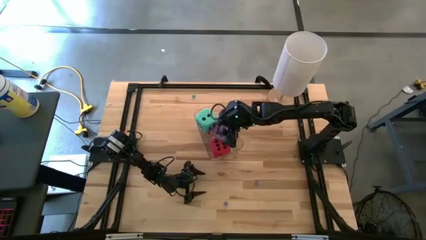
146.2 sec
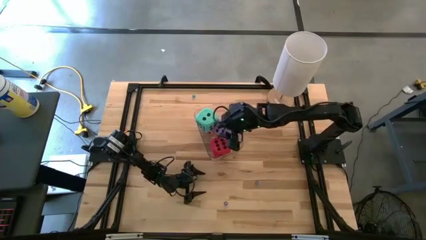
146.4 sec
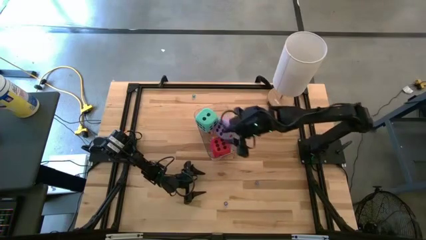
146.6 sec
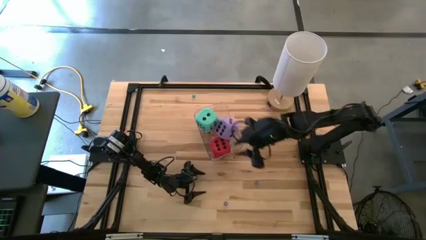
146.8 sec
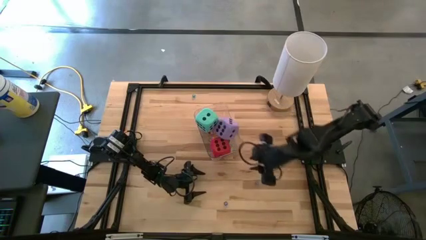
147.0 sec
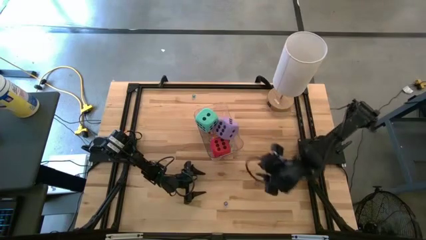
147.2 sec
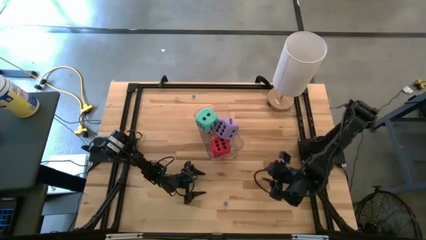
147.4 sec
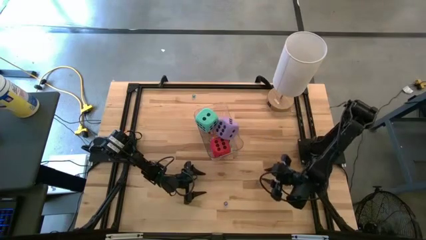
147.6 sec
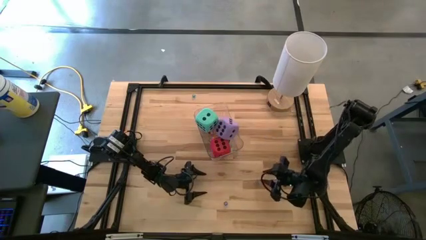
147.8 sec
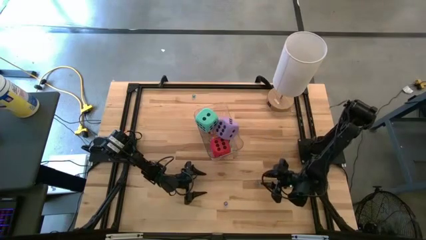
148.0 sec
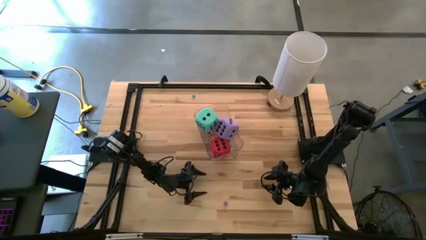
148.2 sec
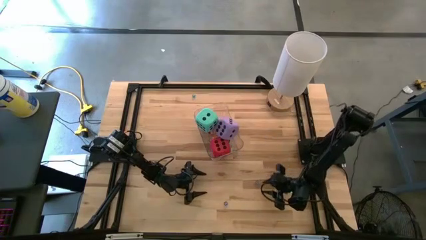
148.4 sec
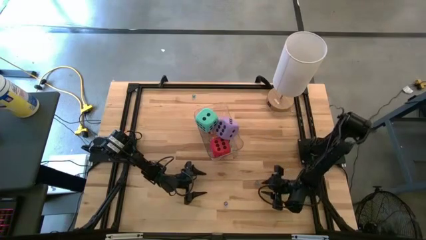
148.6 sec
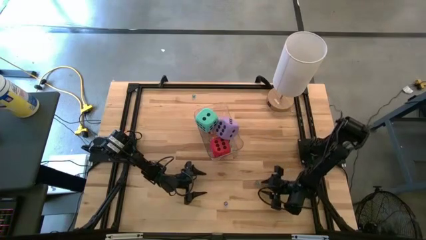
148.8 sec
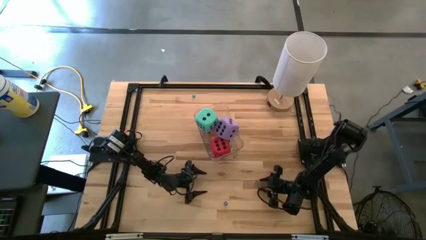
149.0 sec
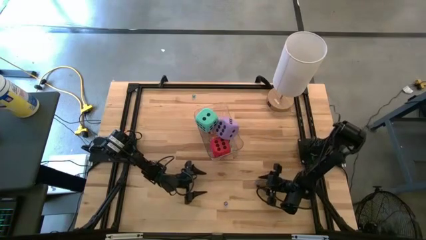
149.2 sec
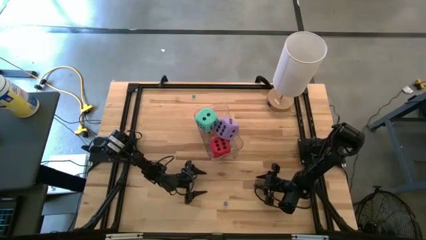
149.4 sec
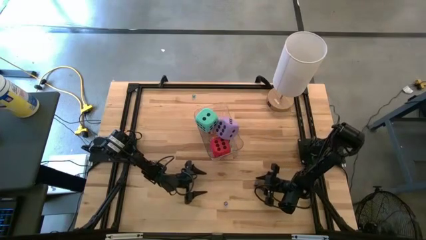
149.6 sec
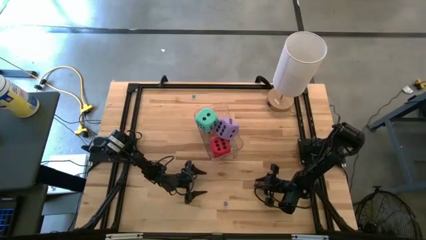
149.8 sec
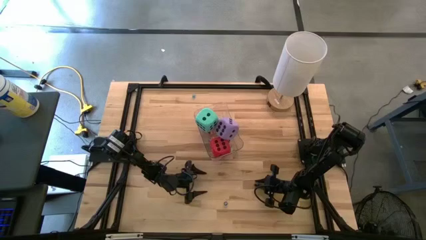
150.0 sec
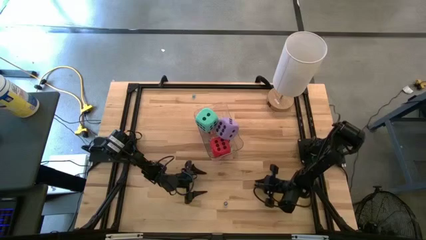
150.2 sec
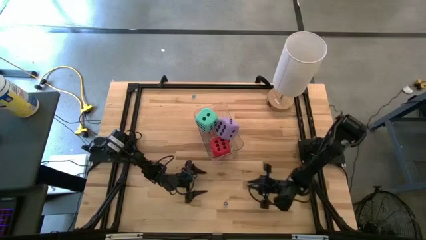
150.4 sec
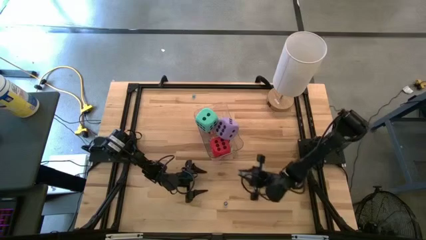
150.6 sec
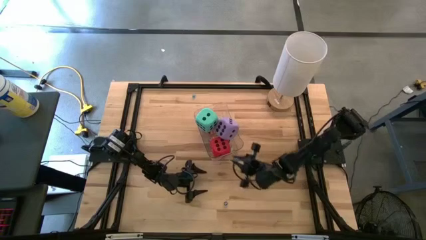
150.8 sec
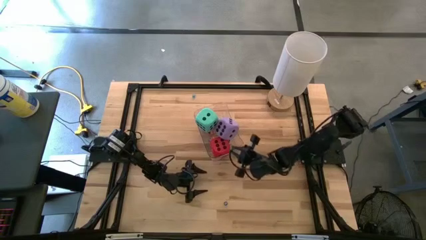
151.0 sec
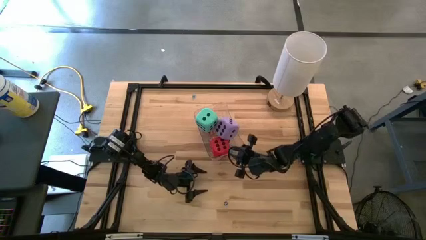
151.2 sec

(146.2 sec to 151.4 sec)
Task: Pick & Place Dice
Put the small blue dice into the transparent bin

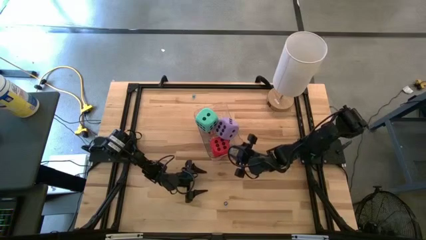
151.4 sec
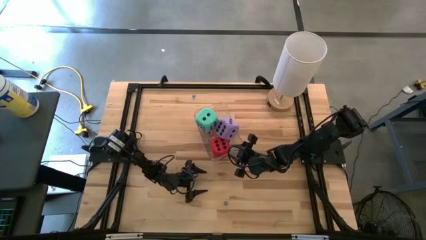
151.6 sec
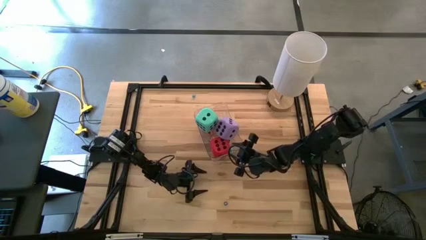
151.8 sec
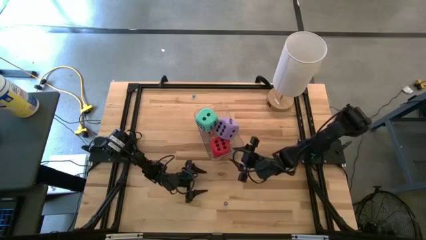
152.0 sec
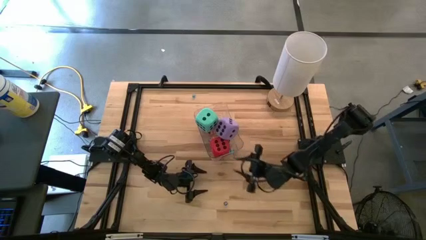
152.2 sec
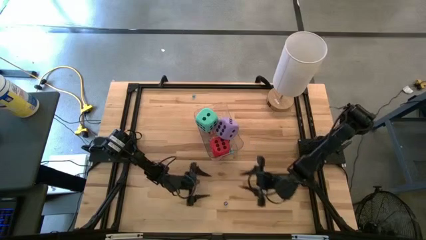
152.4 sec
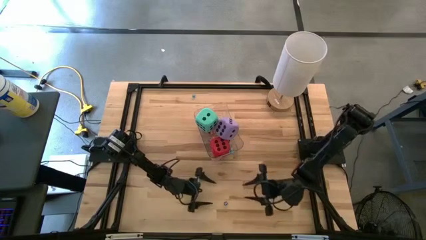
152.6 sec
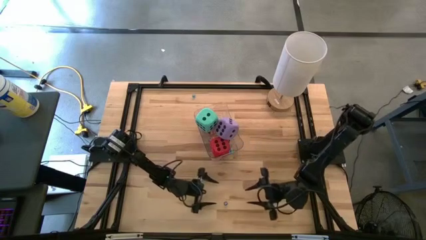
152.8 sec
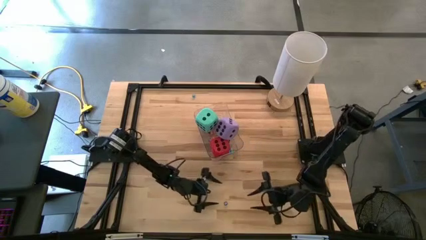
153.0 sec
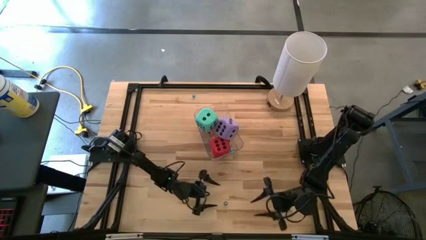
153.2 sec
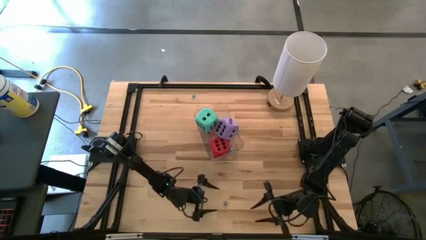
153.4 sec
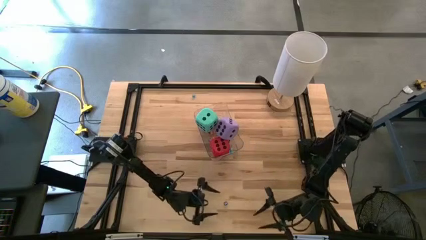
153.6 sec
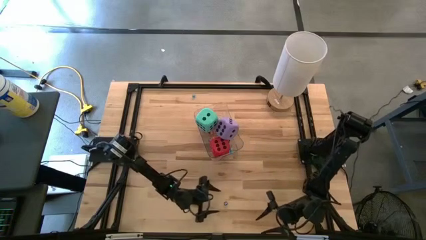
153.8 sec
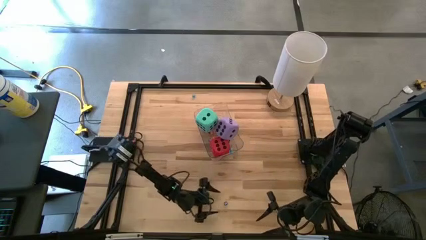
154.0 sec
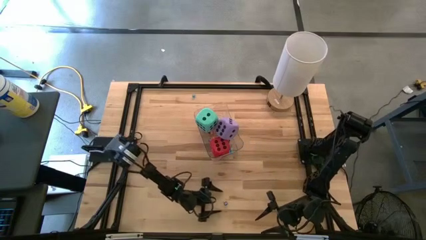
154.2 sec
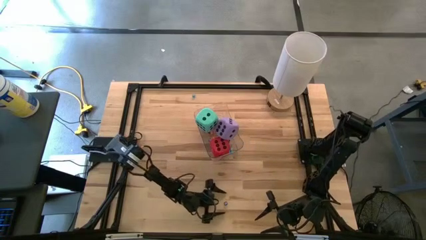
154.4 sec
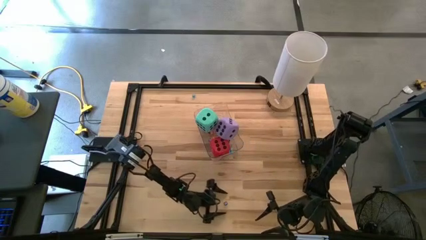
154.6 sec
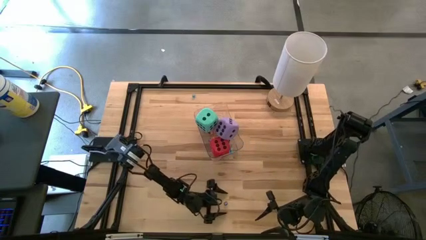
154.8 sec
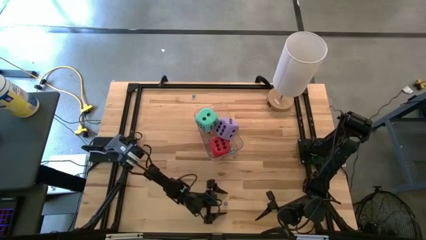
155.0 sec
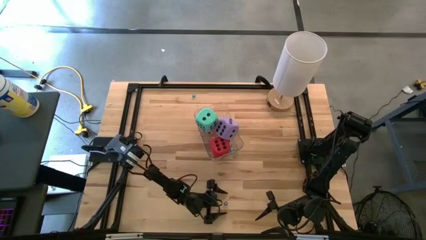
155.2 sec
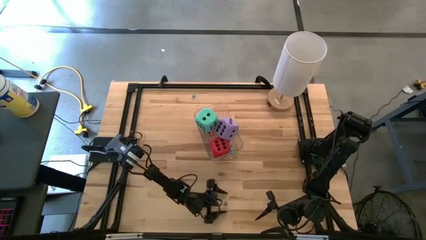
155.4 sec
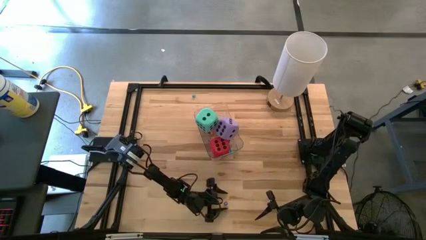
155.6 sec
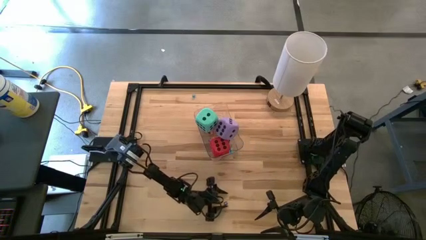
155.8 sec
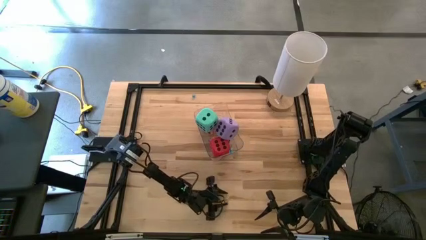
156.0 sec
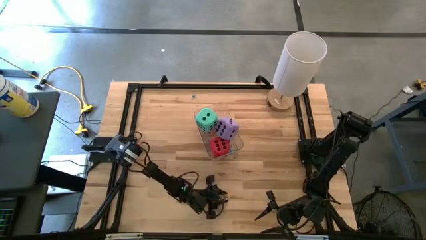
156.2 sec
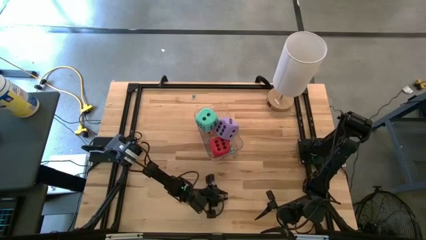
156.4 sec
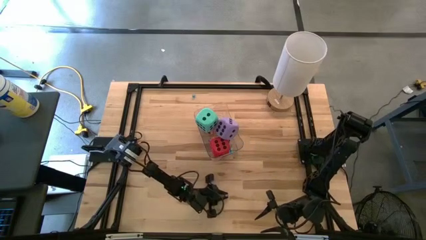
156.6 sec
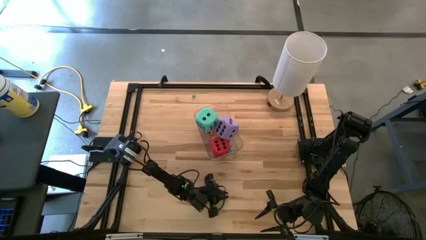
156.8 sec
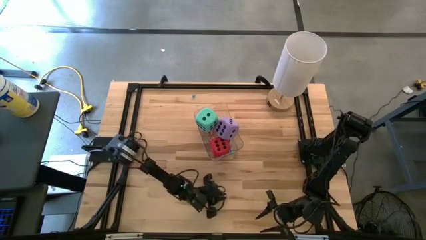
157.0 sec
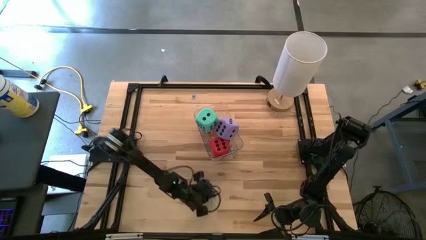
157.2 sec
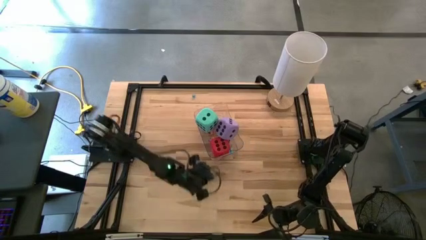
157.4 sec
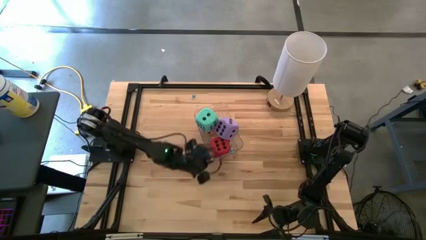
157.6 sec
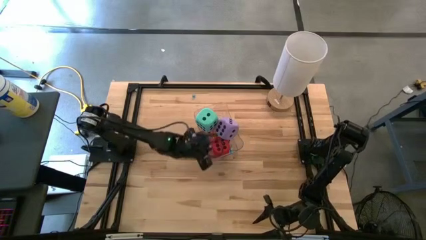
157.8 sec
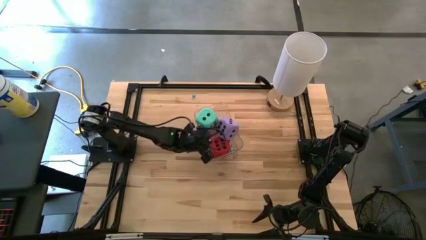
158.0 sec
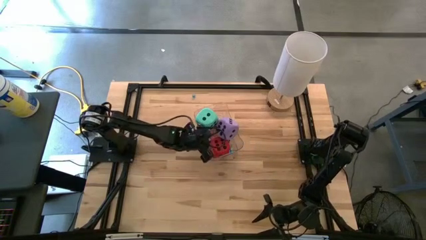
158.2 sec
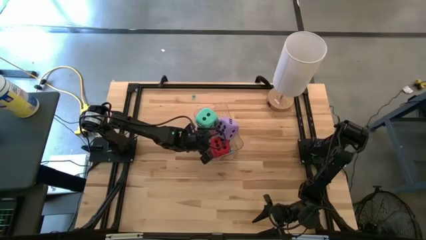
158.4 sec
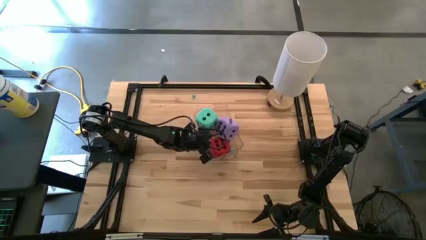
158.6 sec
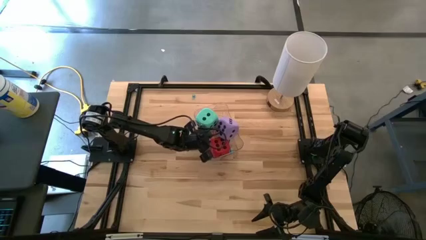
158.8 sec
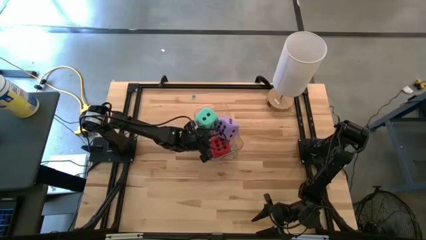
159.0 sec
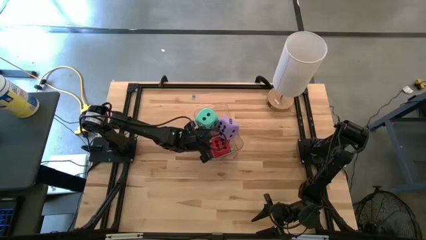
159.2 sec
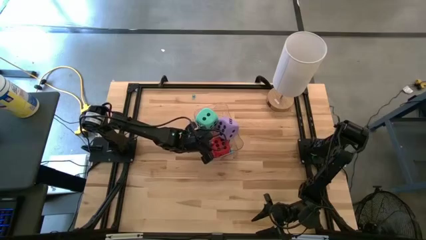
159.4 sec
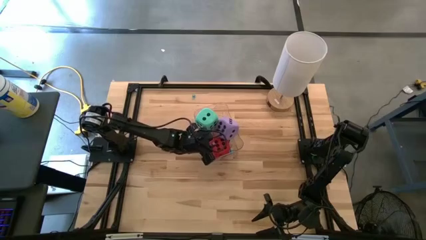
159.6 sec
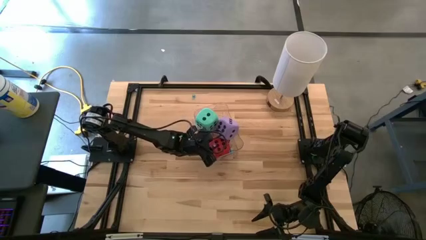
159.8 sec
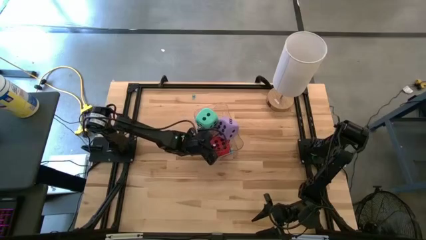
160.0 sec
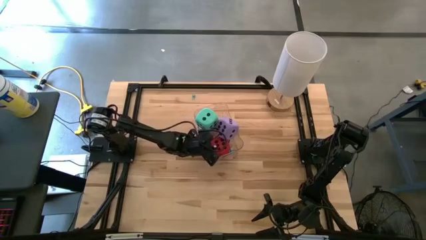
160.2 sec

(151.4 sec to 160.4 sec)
Put the small dark blue dice into the transparent bin

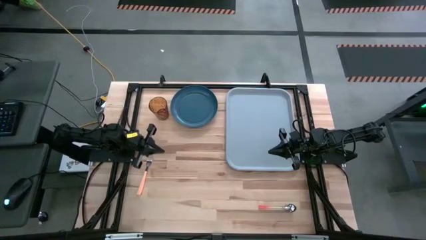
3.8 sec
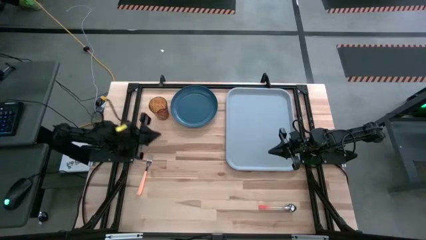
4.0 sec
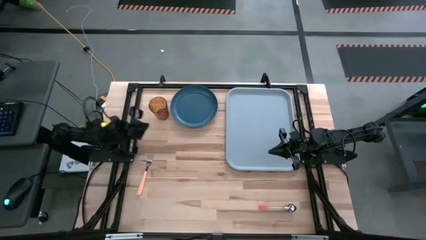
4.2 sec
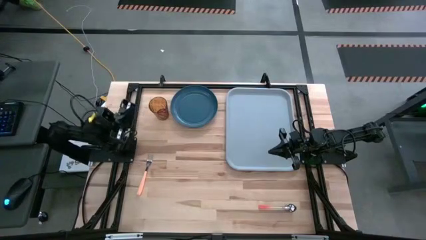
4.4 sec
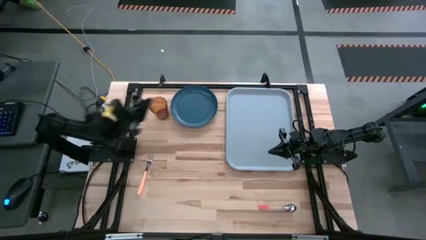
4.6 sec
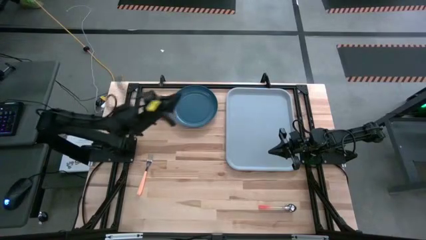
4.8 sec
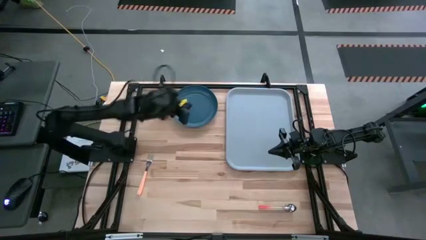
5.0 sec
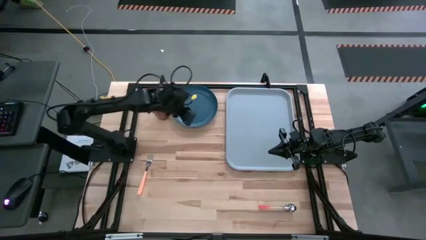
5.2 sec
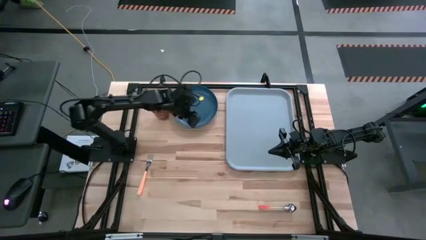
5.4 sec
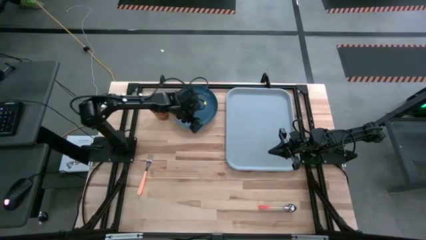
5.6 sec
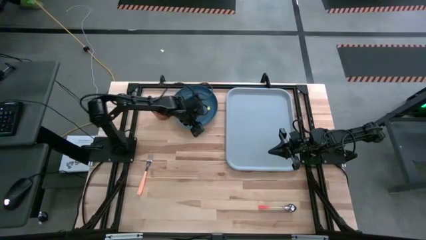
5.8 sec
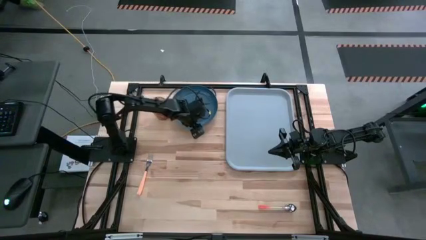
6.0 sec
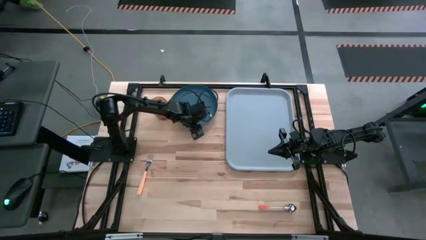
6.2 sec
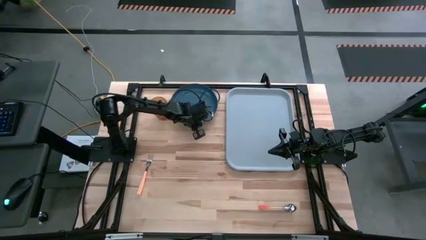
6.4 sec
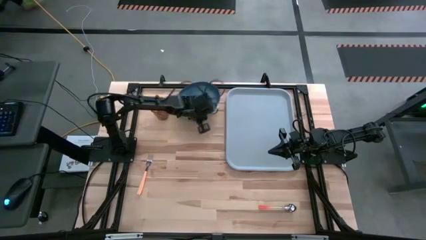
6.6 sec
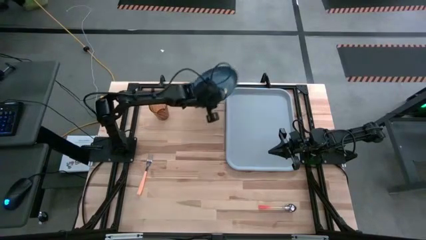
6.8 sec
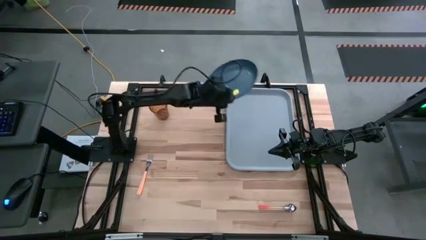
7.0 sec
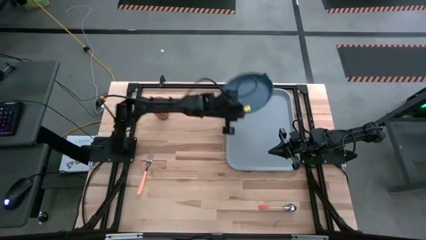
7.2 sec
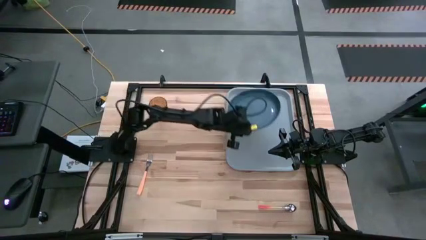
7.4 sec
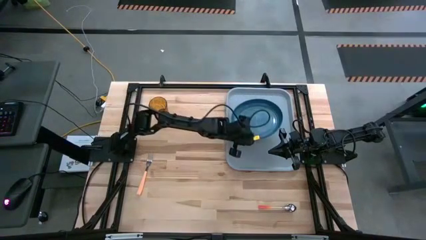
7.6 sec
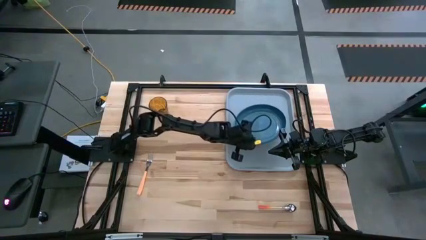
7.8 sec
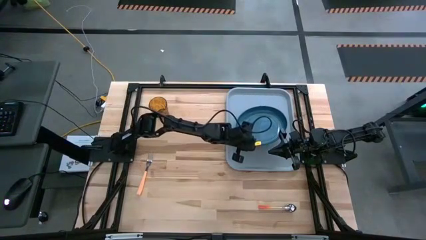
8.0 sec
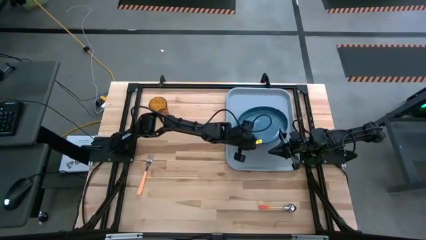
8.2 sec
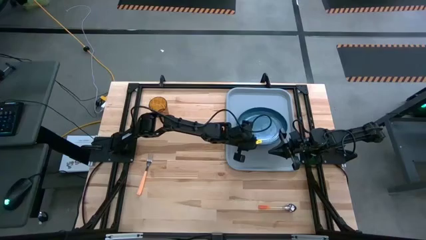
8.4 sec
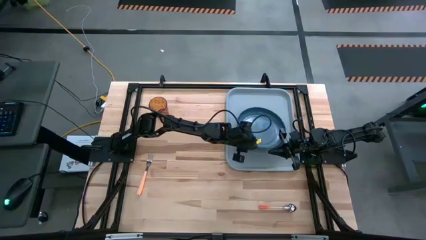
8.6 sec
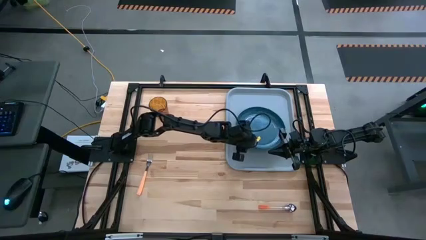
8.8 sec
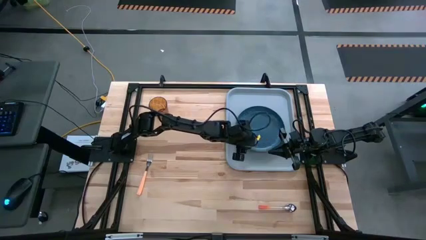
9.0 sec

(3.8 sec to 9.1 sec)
Task: Pick and place plate/cup/fork/spoon on tray
Put the blue plate on the gray tray
